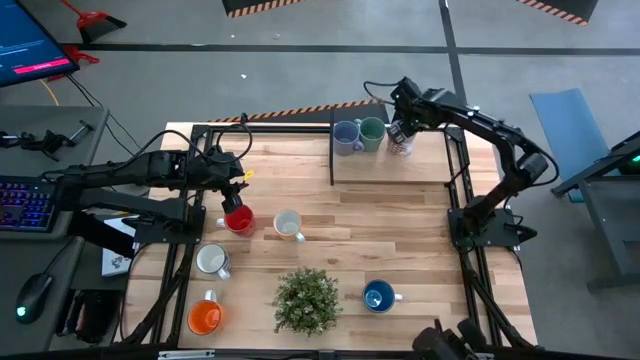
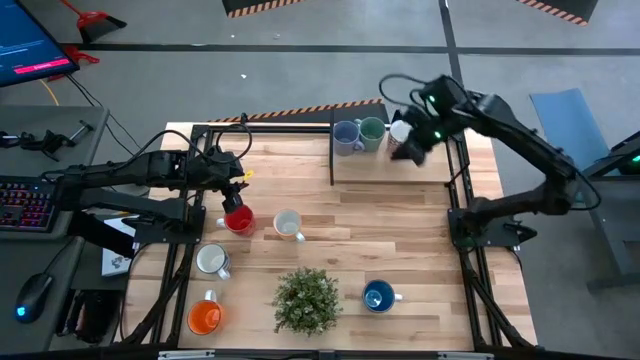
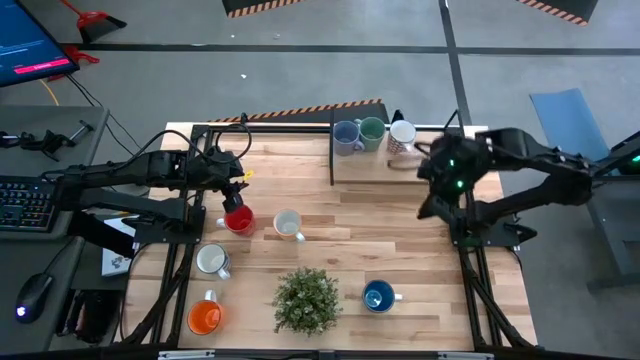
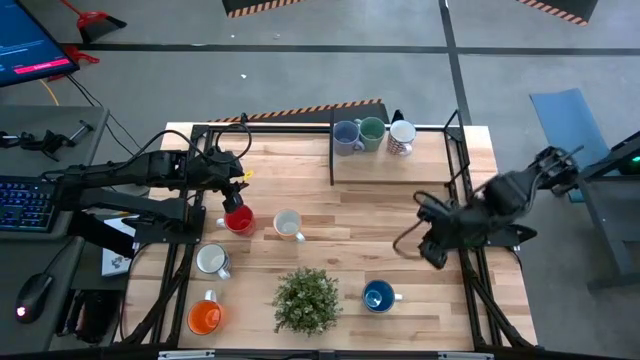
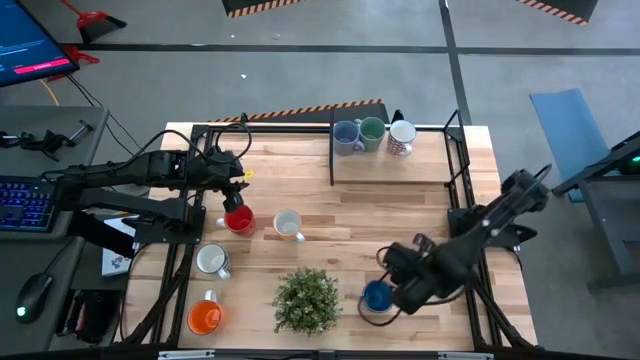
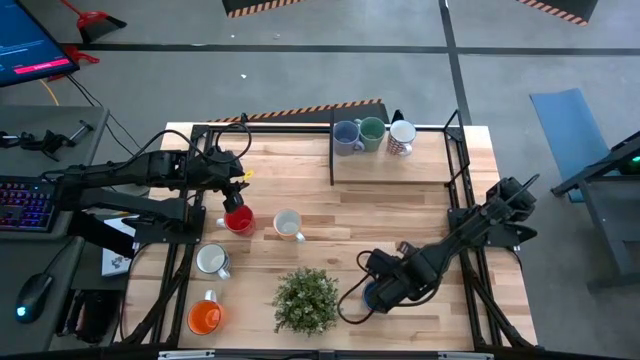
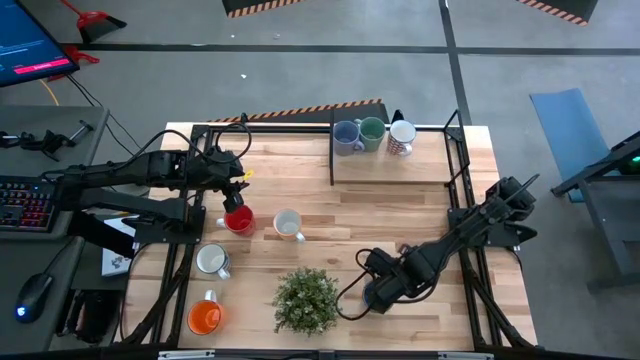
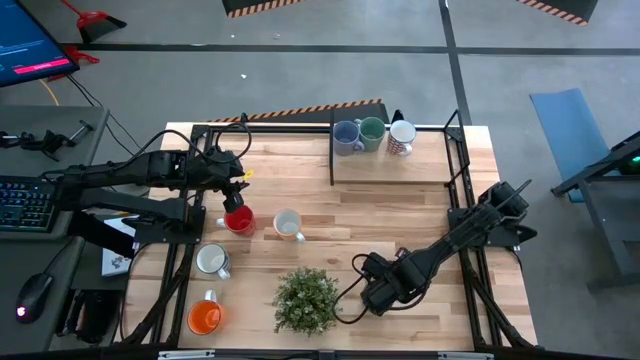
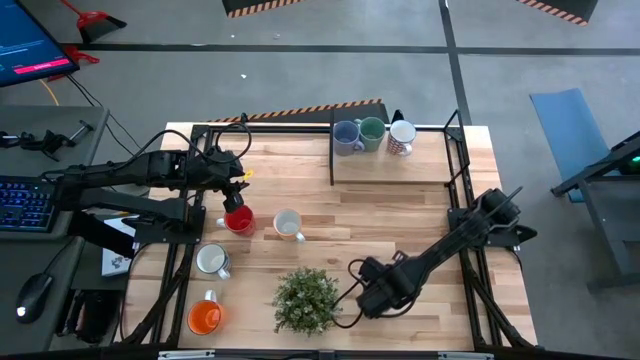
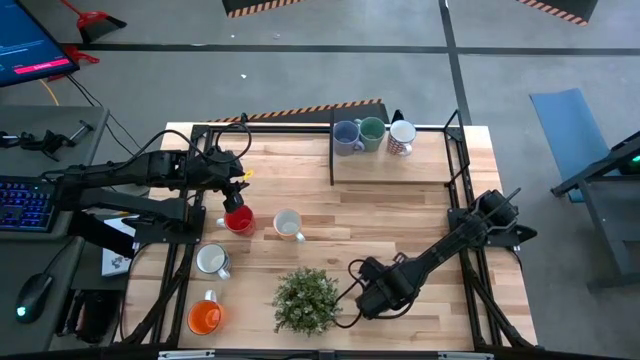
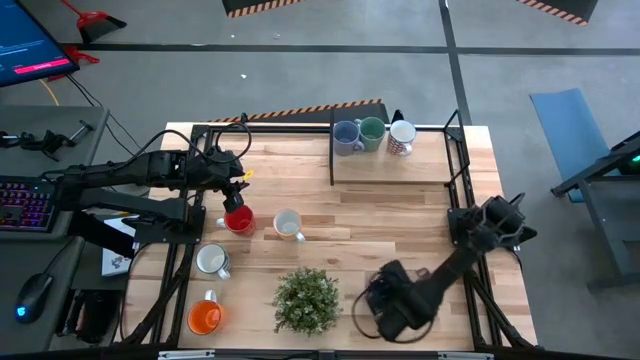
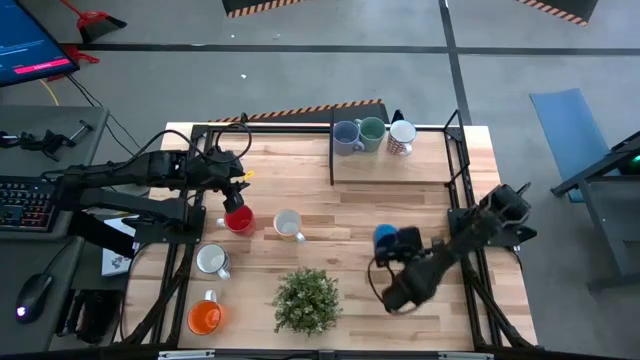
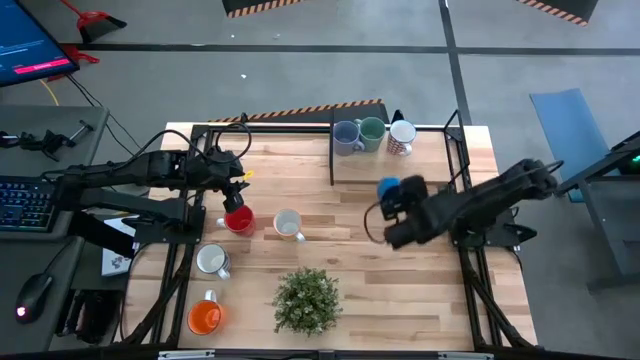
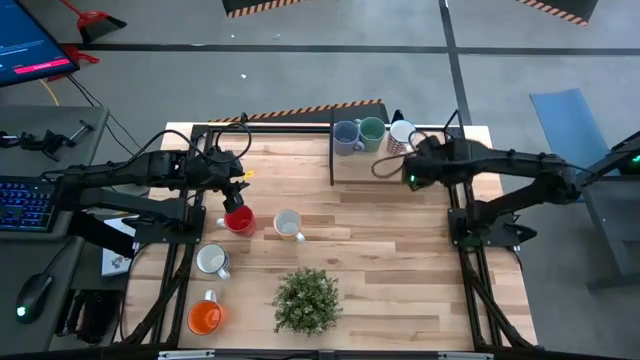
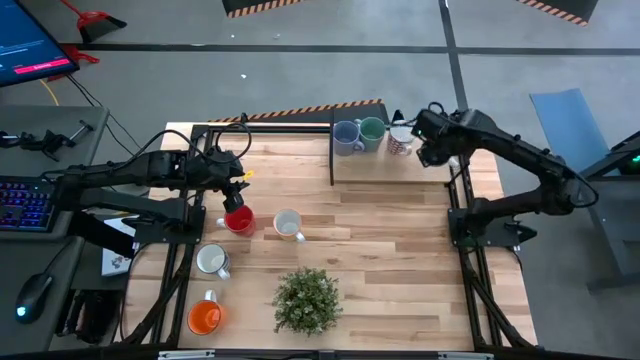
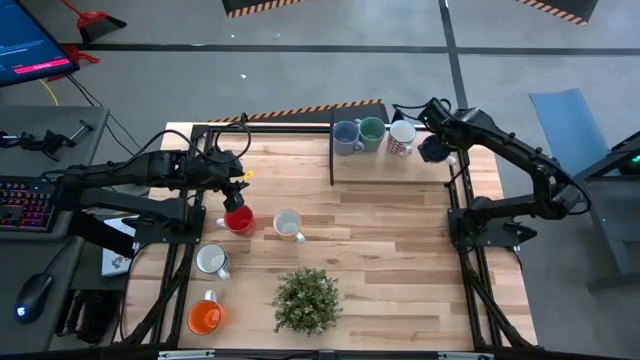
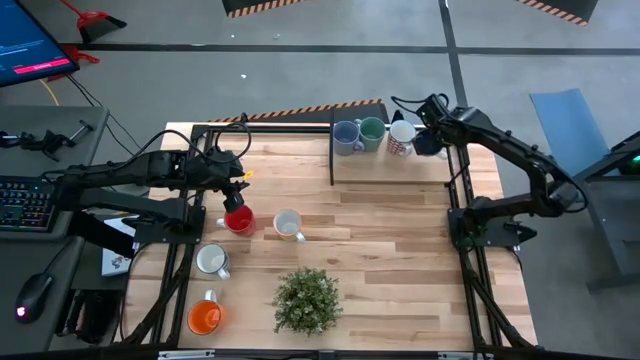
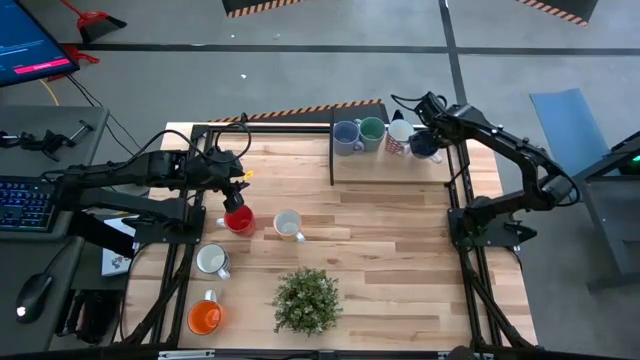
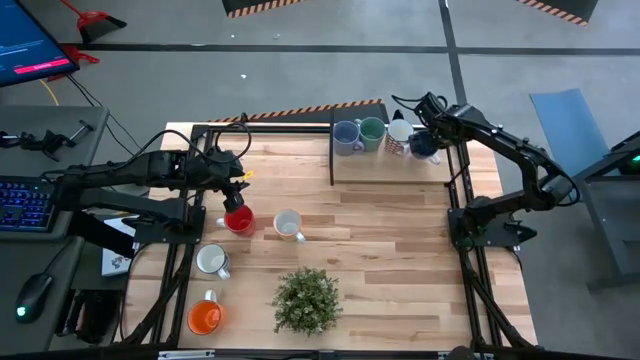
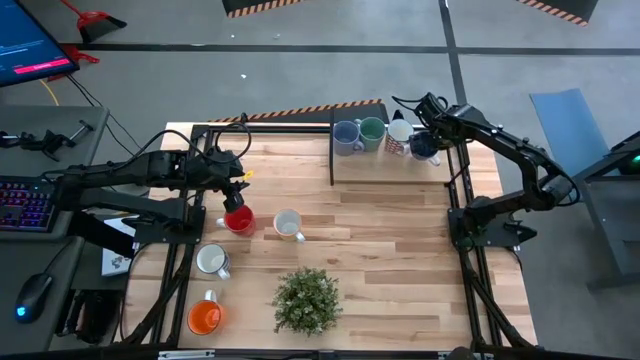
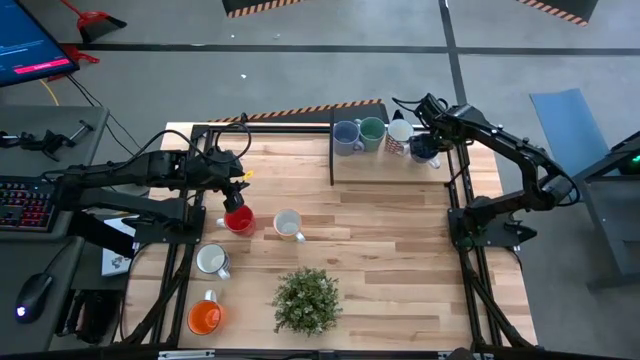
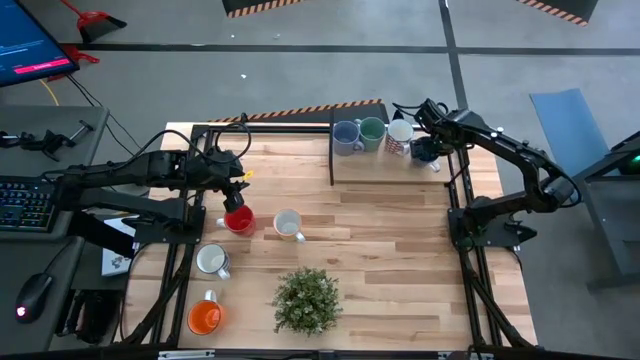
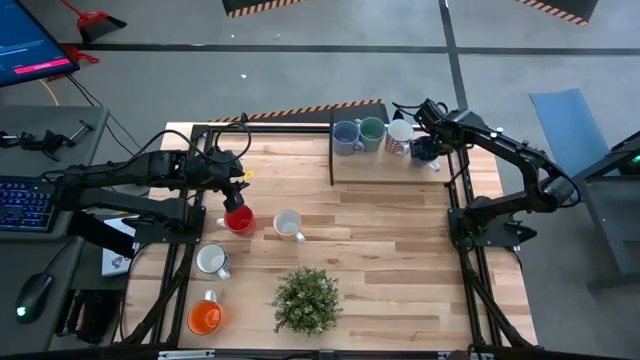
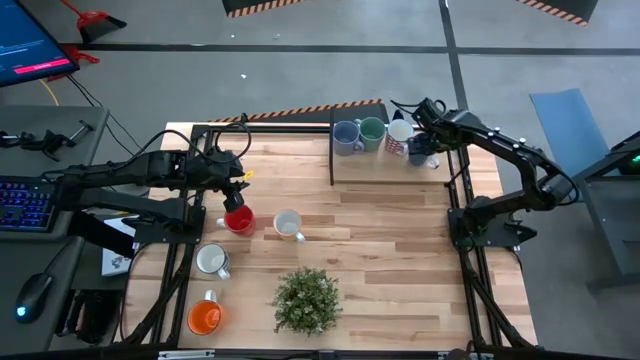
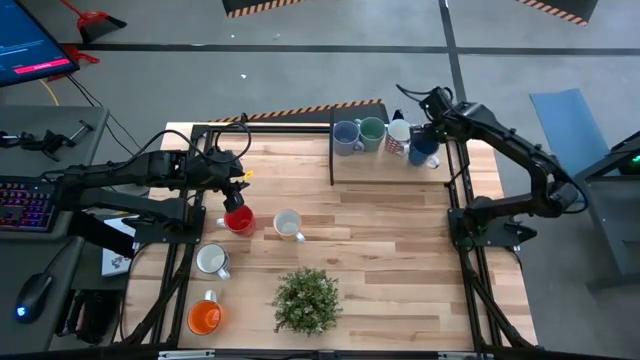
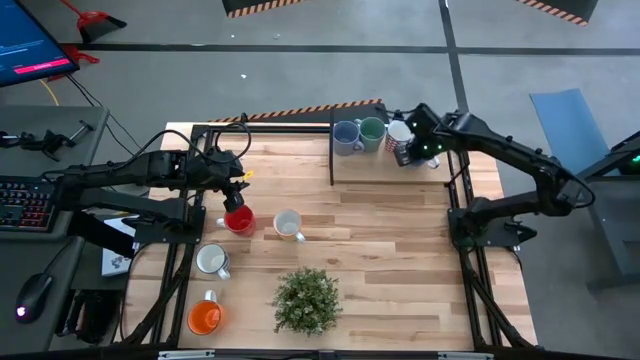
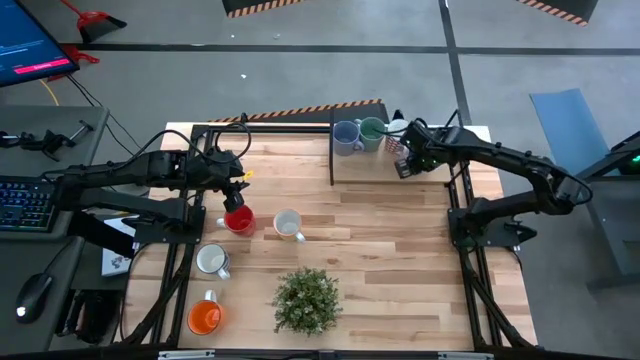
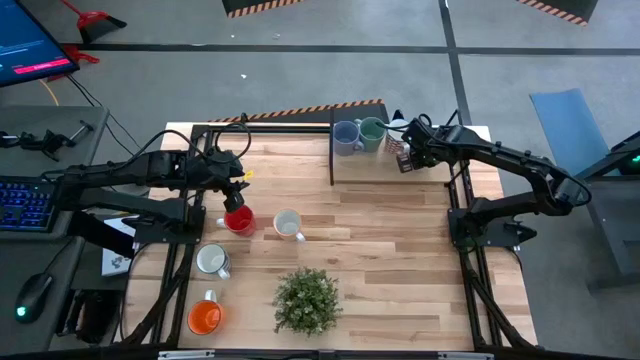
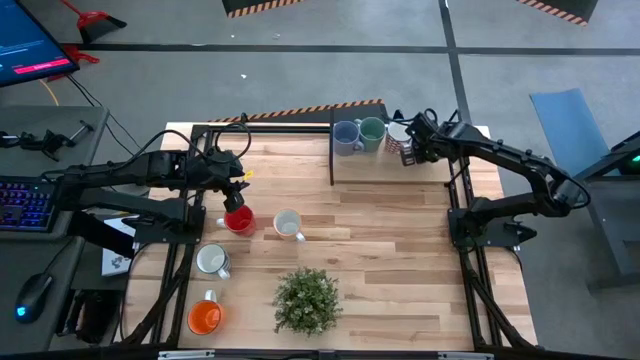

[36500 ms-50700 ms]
Task: Place coffee mugs
Put the blue mug on the shelf

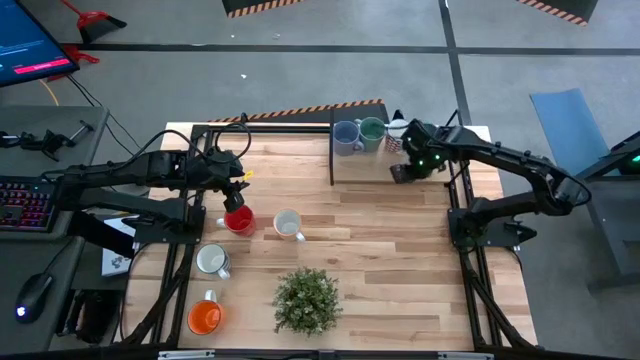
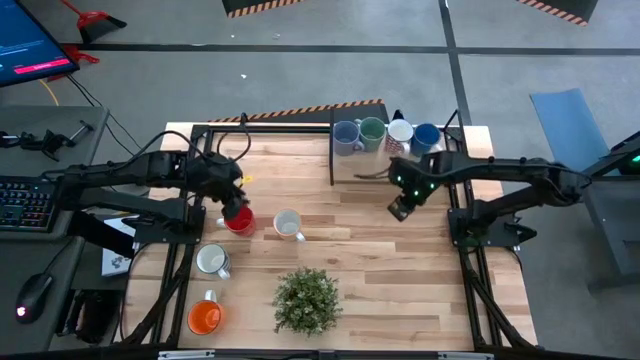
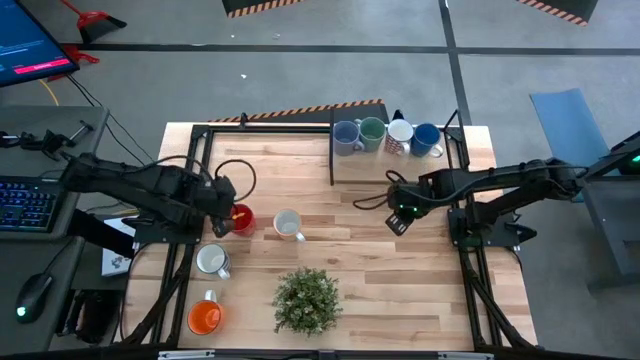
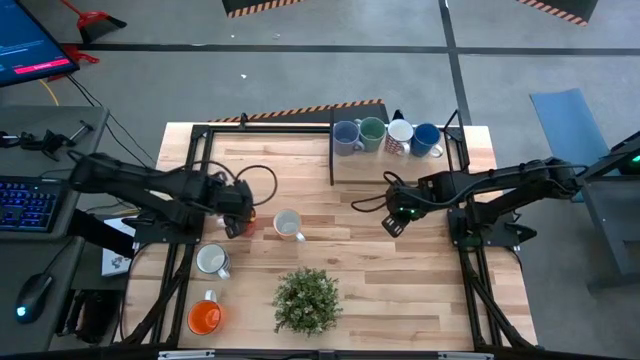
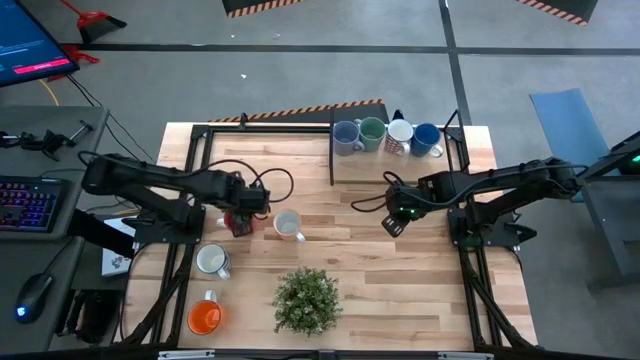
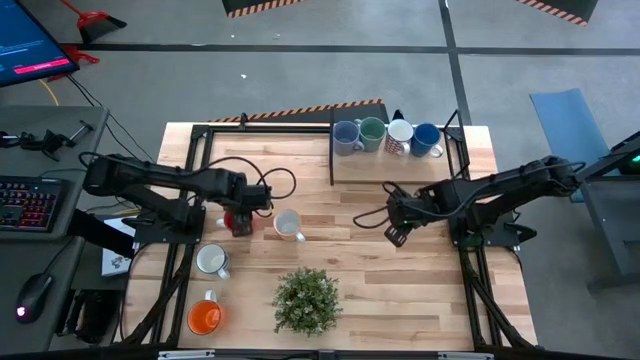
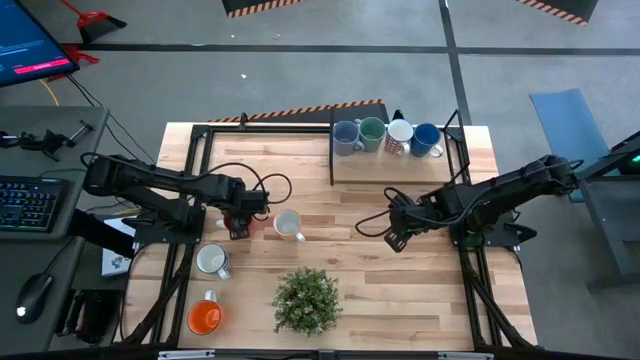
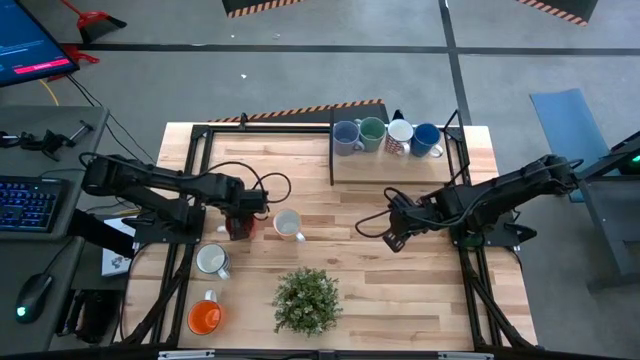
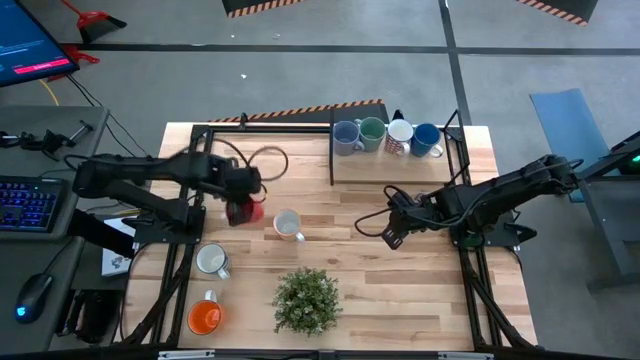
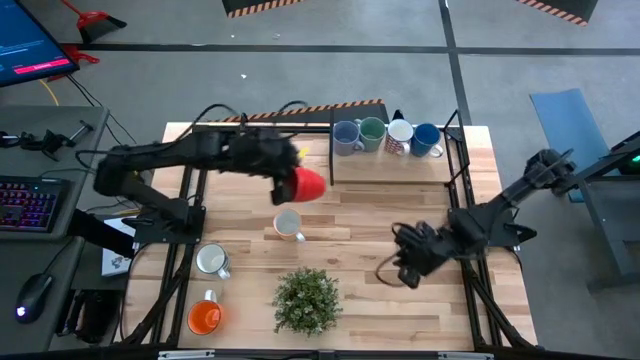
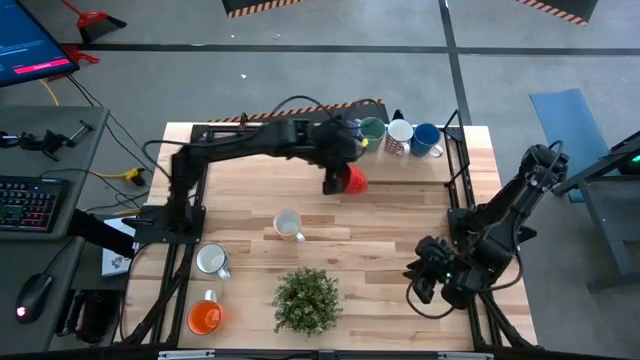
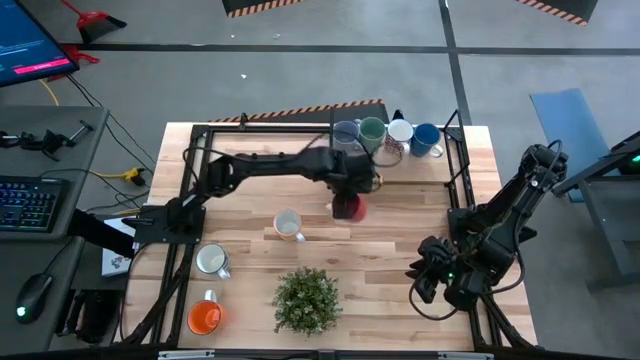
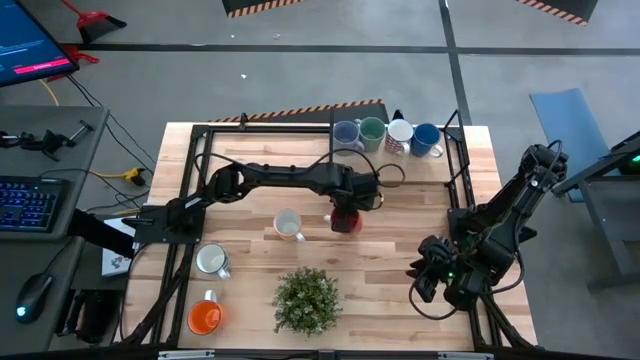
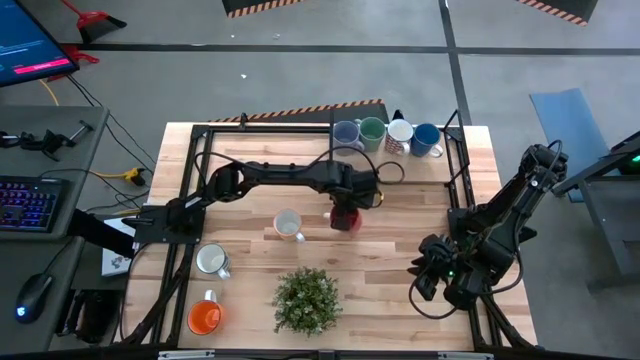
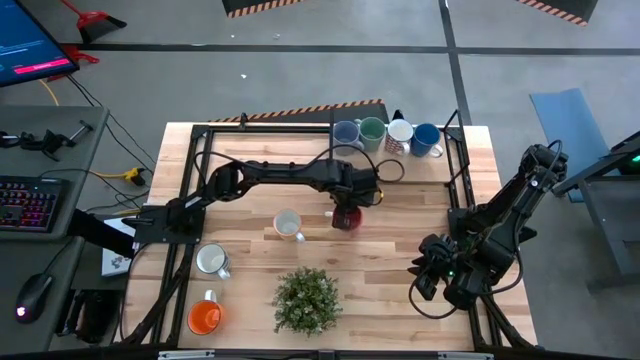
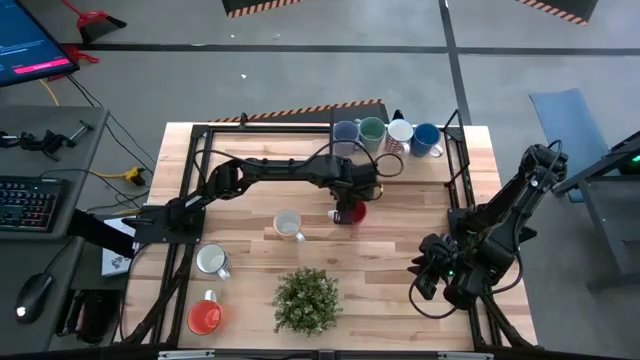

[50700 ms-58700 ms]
Move the red mug to the center of the table
